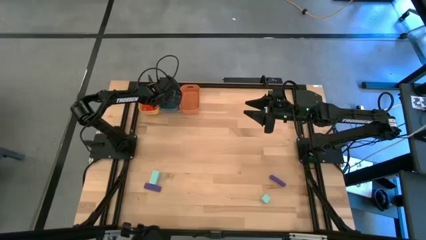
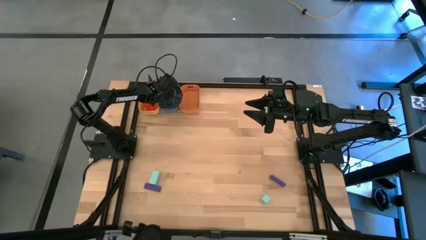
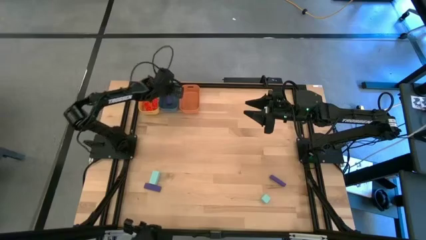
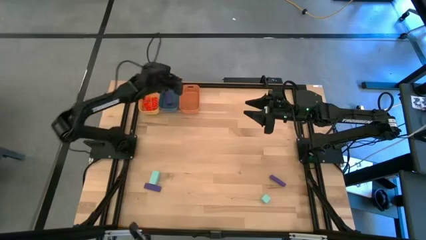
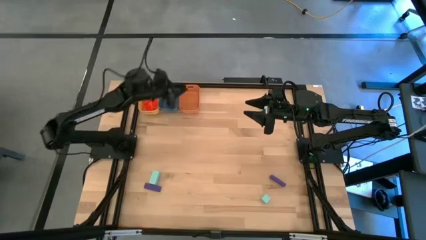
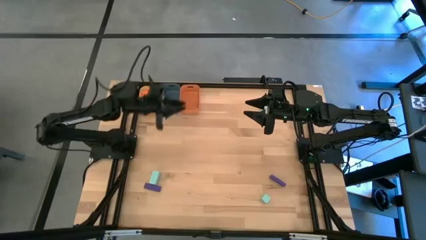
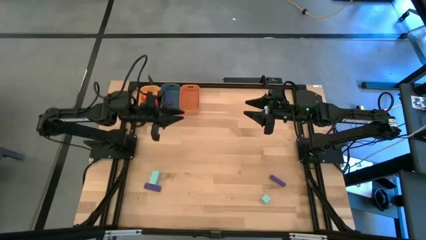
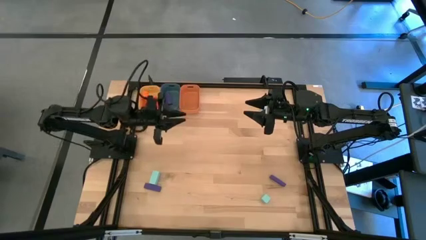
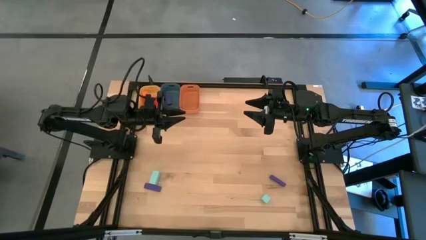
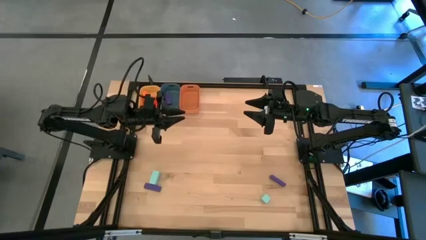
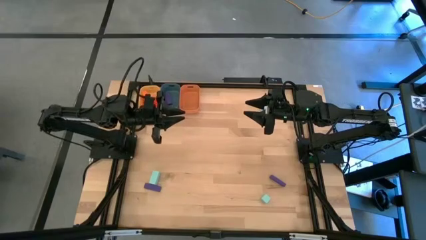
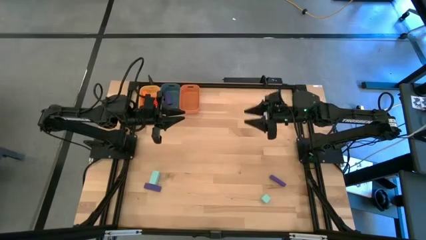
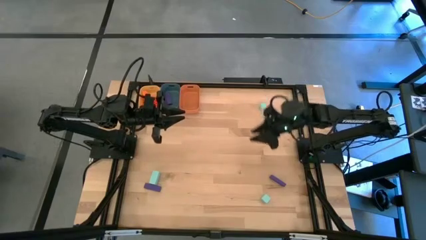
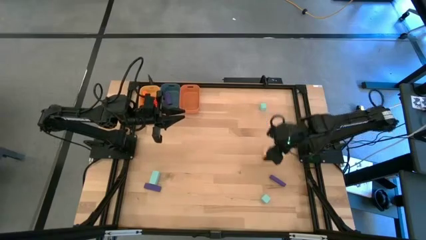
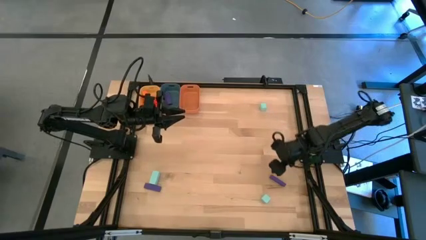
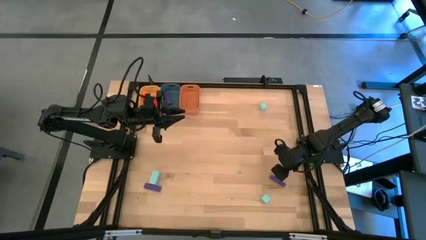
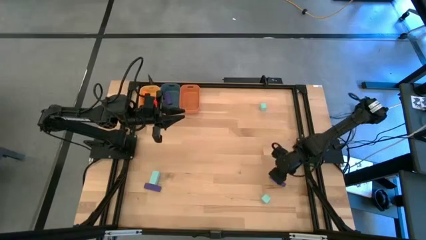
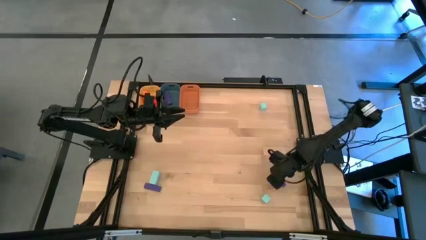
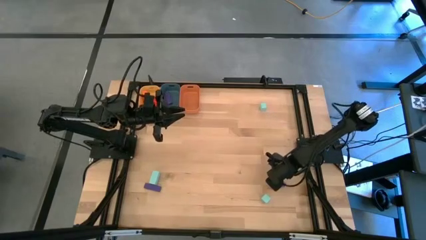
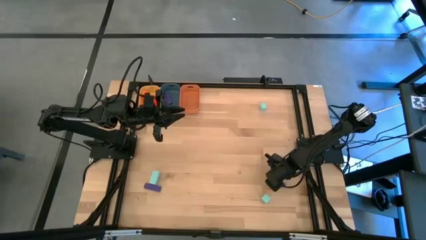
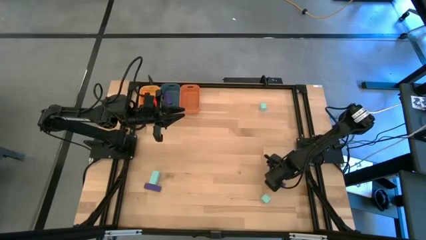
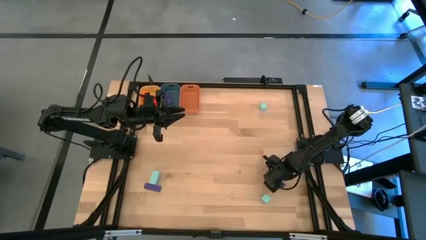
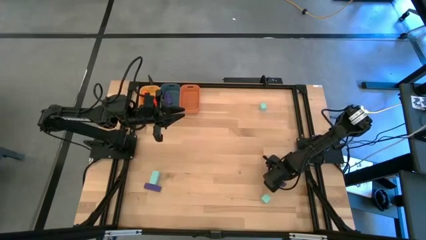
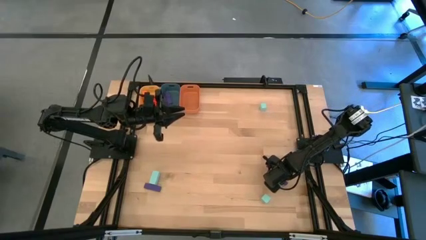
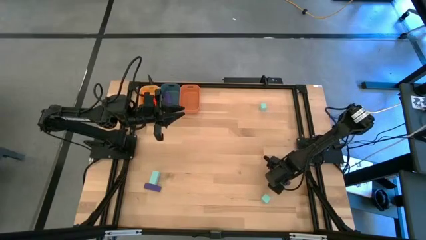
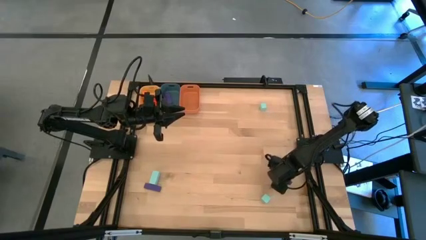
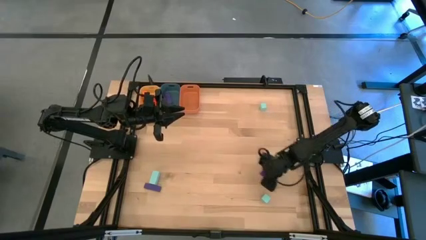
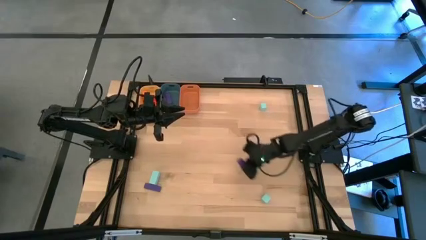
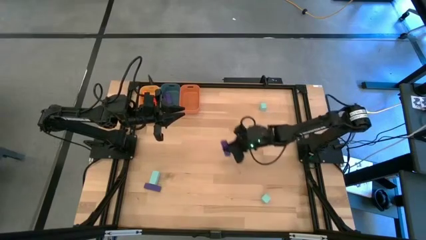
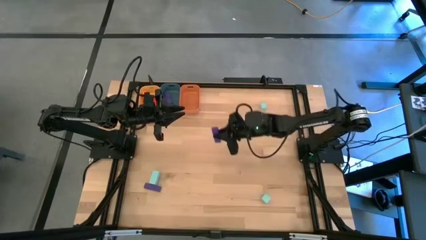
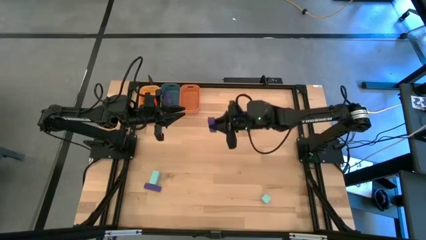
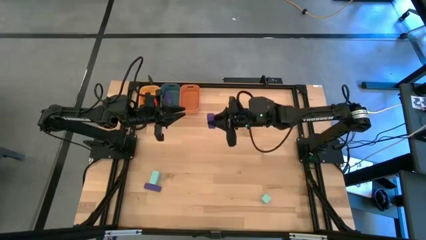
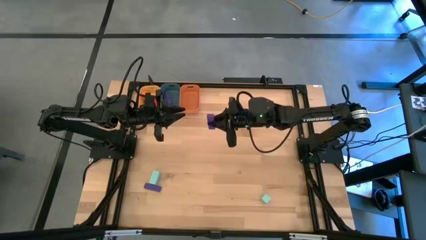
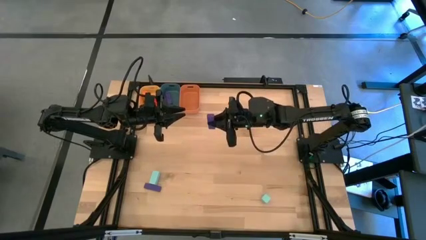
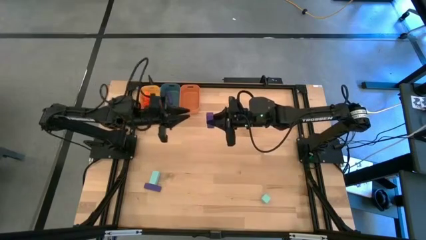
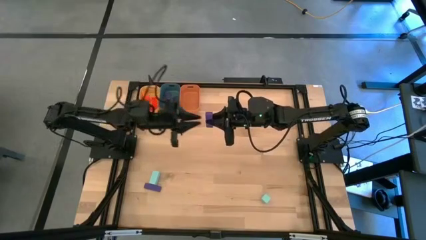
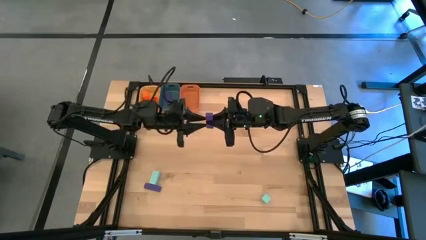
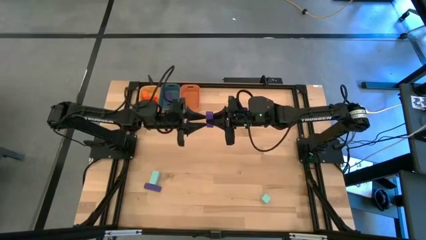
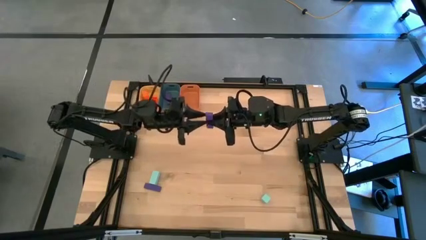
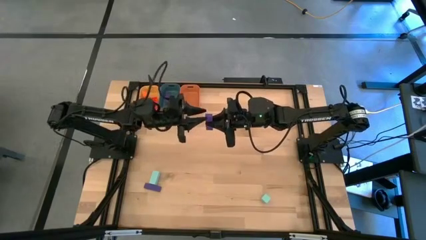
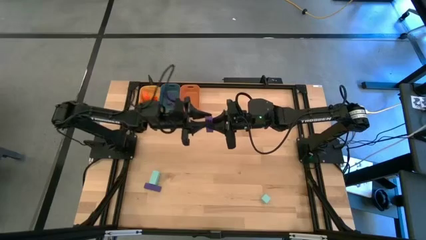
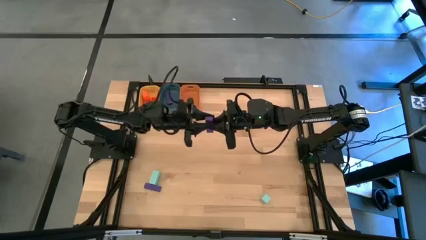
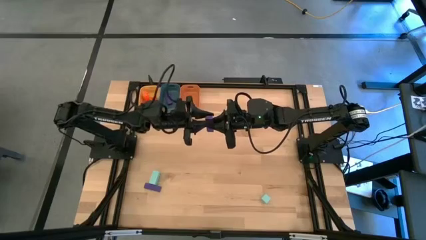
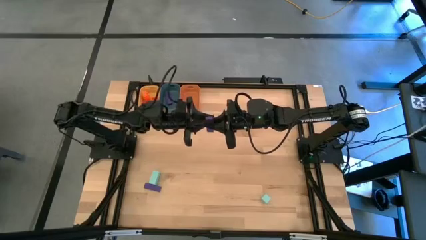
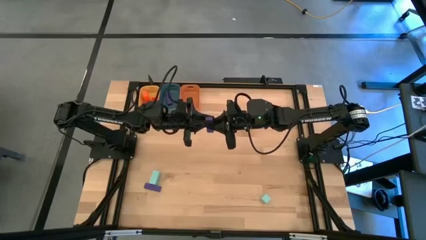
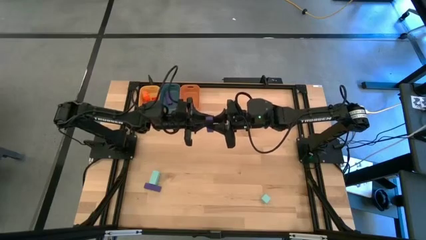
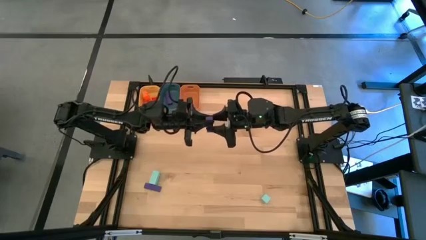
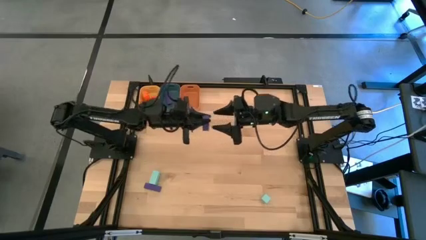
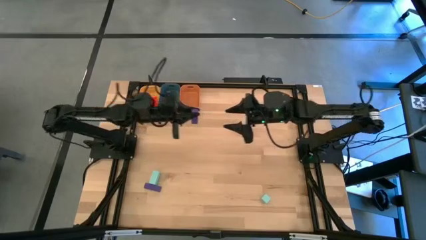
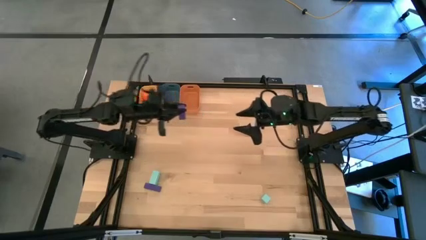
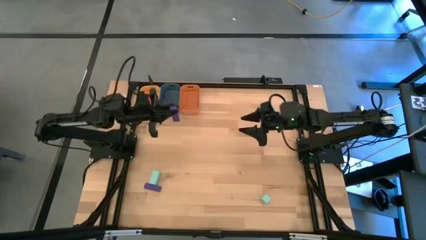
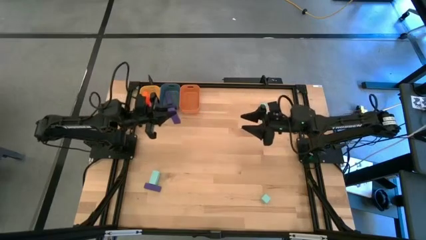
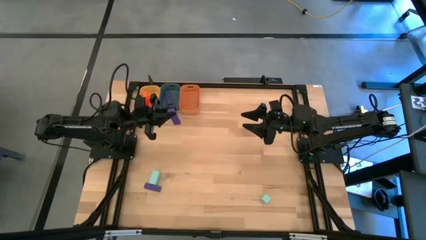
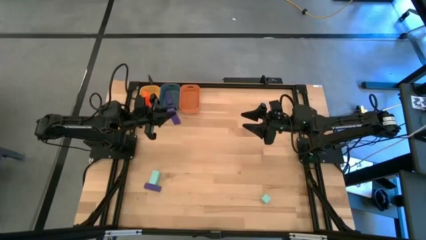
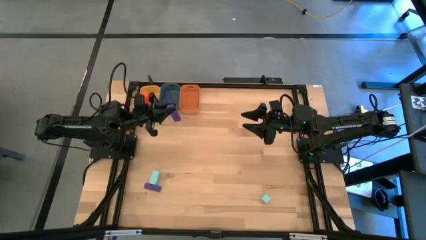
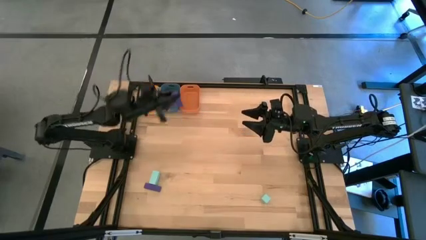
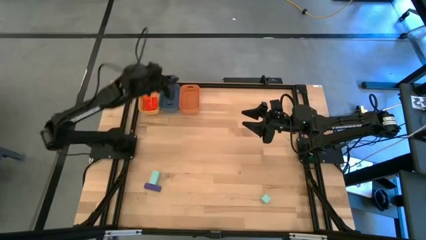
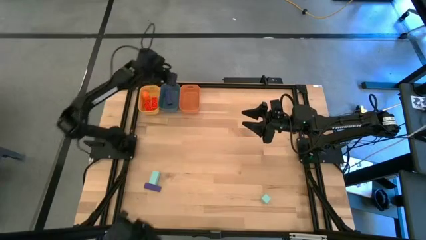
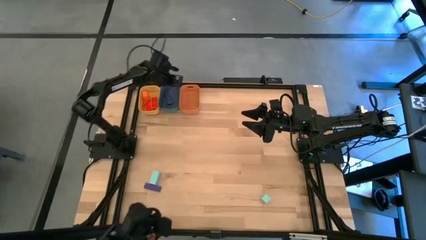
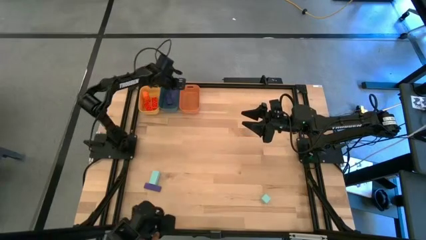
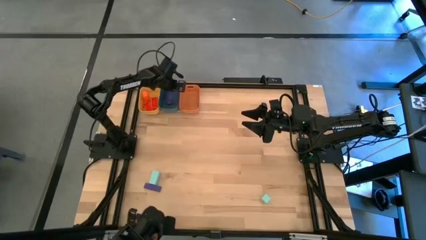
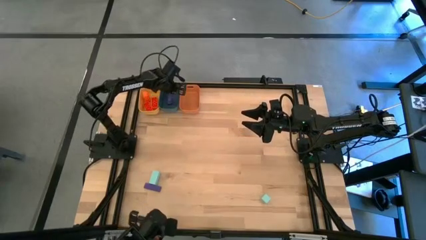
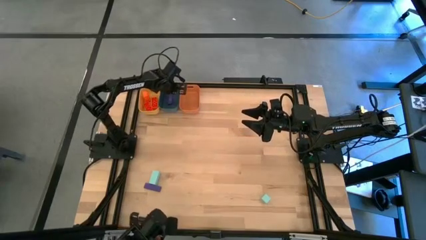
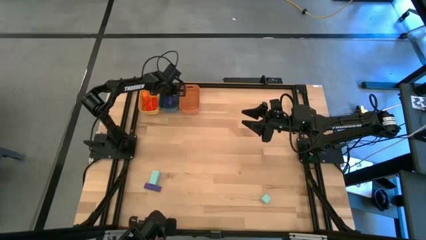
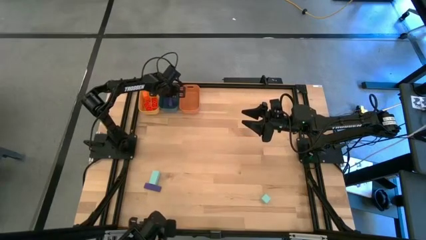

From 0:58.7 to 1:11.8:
Task: Sort & place blocks by color
Put the right violet block into the blue bin

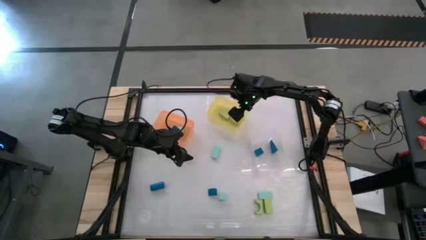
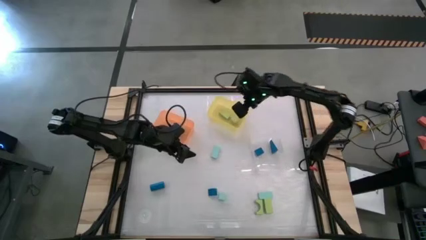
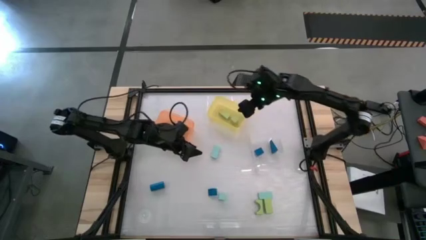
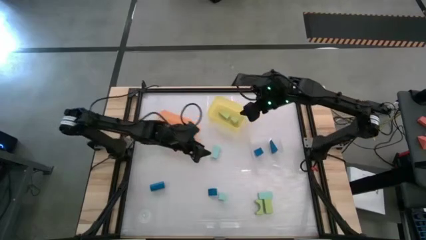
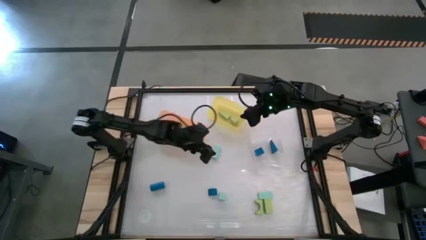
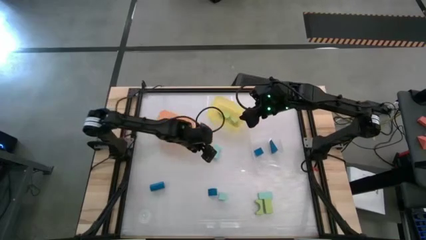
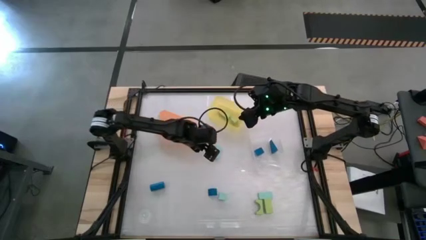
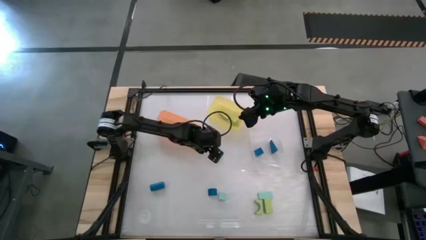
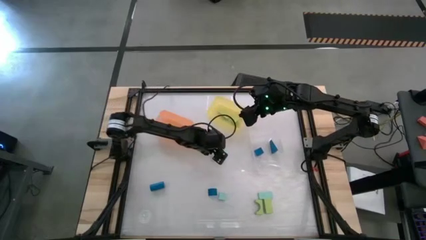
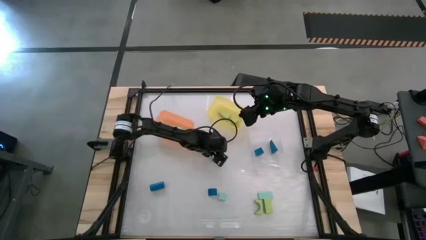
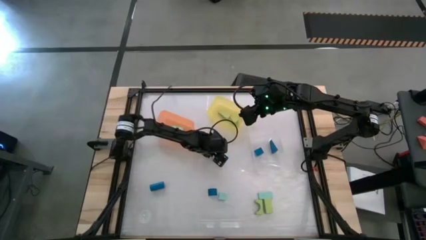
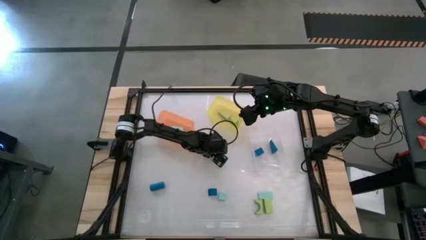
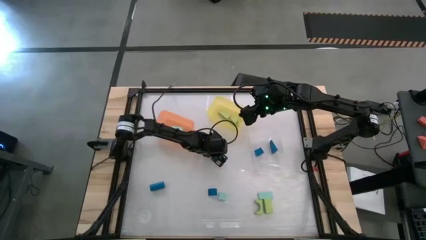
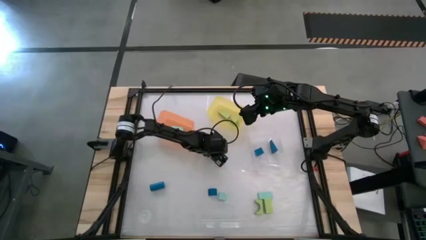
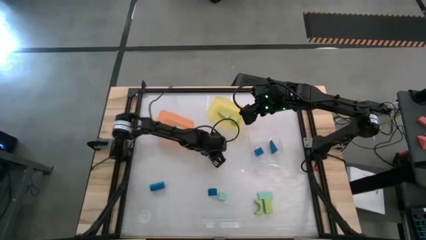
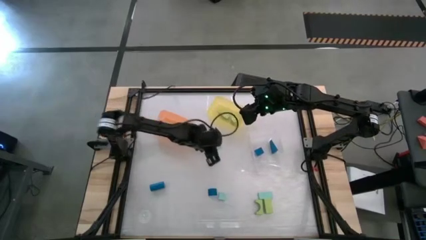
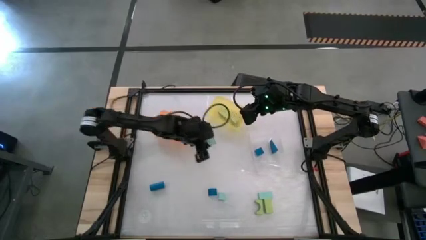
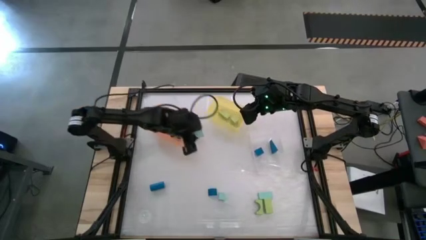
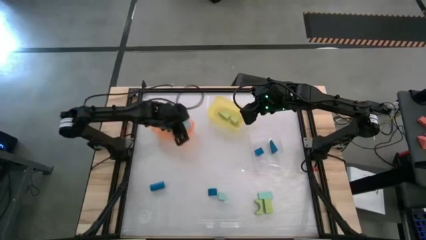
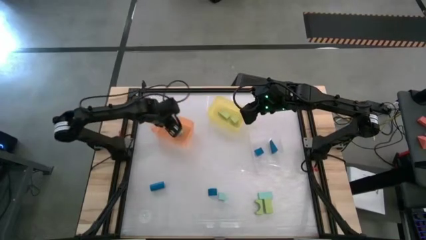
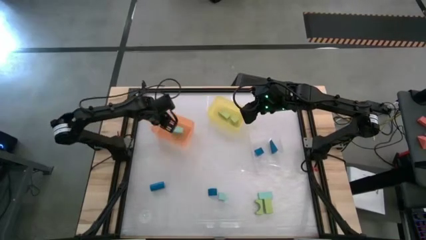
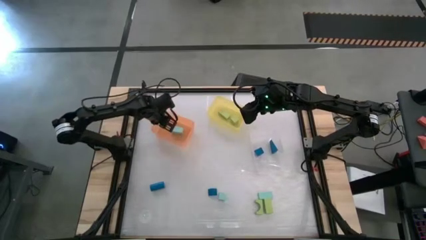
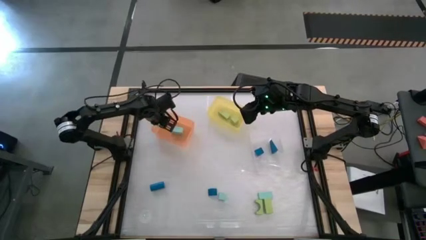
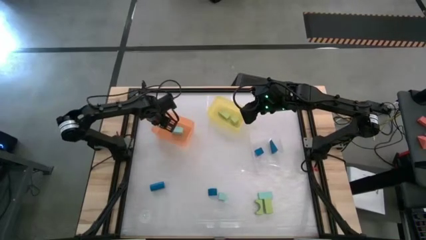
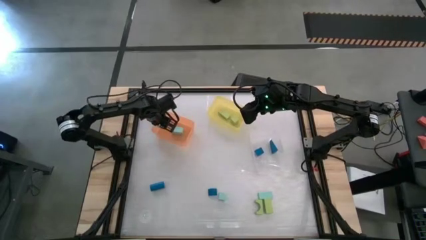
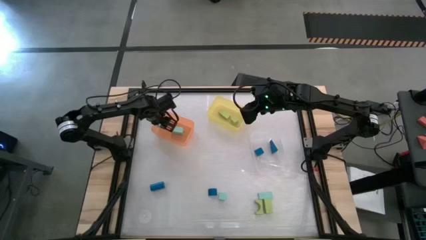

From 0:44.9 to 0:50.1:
Task: Sort & place blocks by color
Put the light blue block into the orange bin
